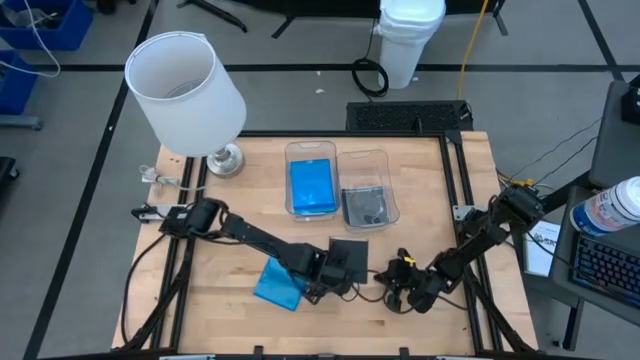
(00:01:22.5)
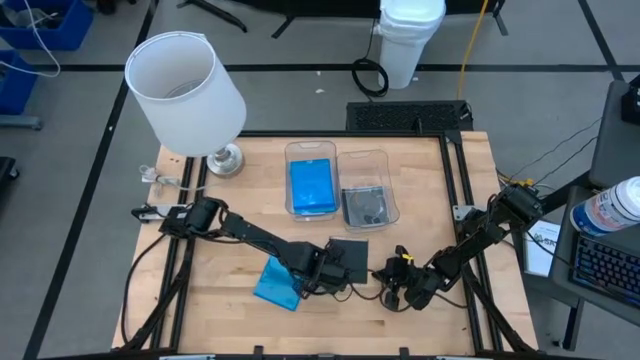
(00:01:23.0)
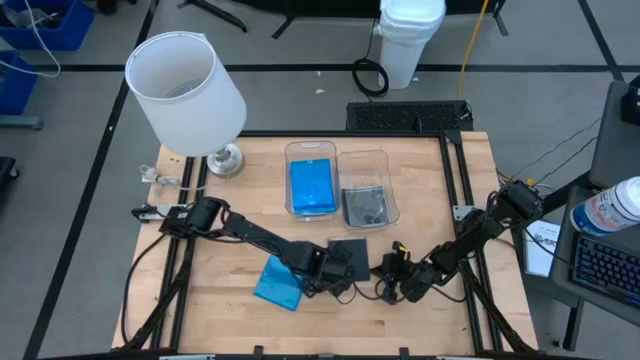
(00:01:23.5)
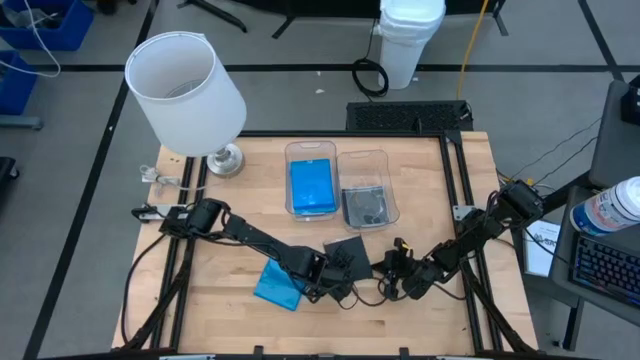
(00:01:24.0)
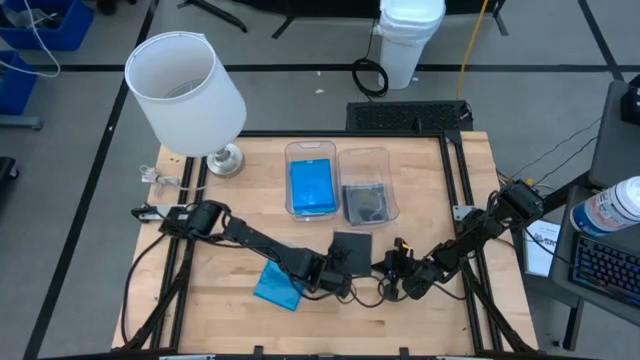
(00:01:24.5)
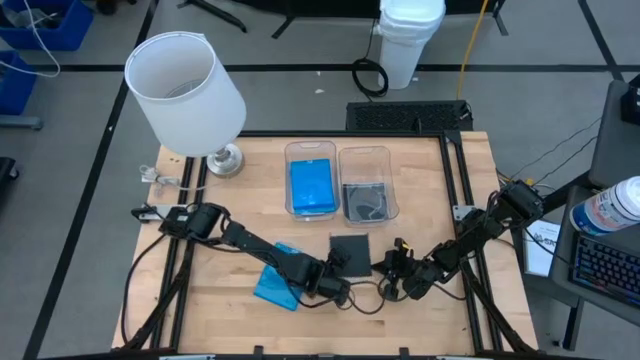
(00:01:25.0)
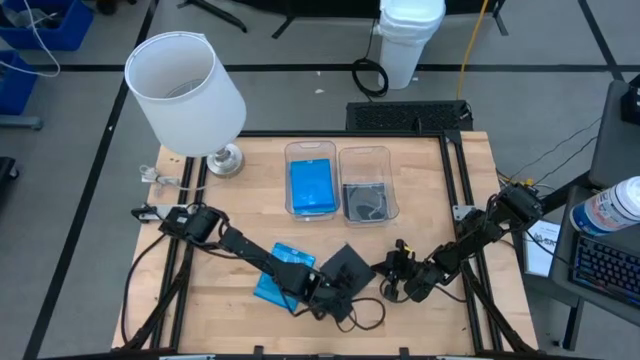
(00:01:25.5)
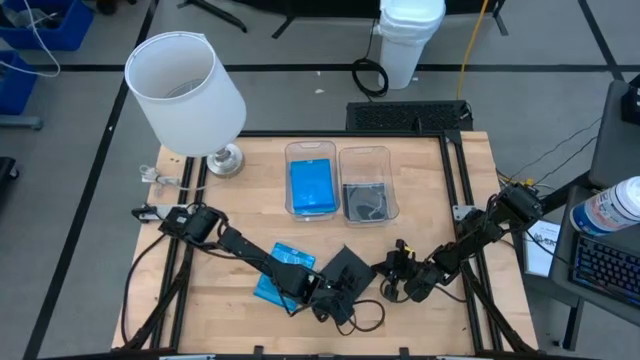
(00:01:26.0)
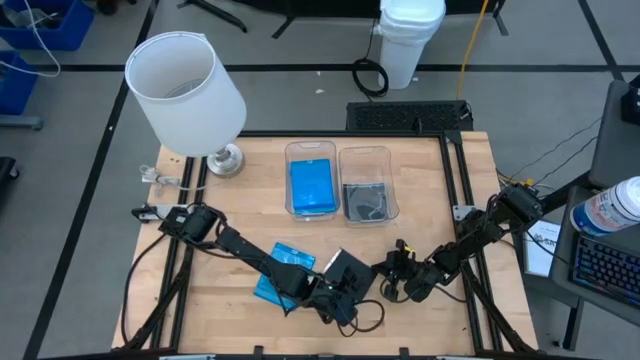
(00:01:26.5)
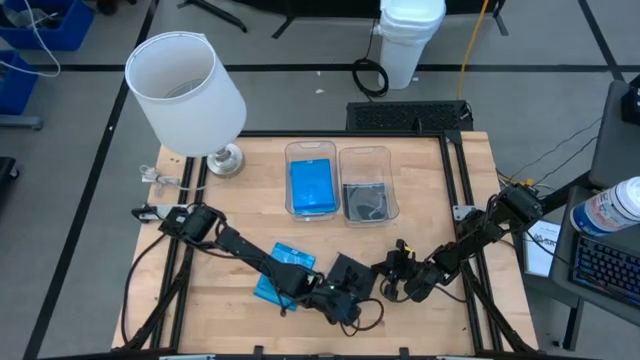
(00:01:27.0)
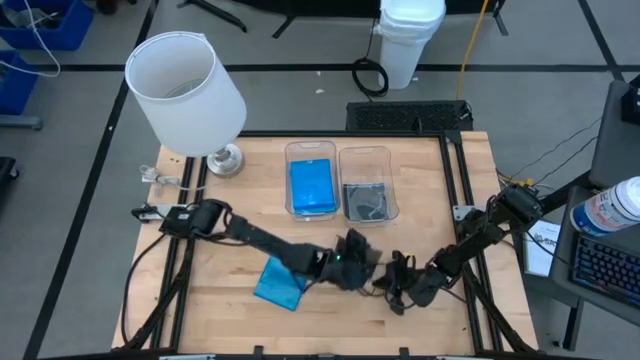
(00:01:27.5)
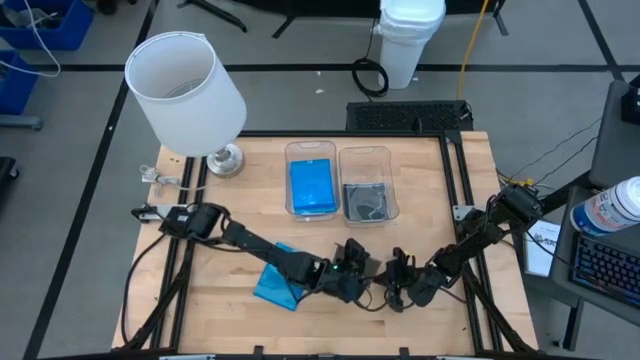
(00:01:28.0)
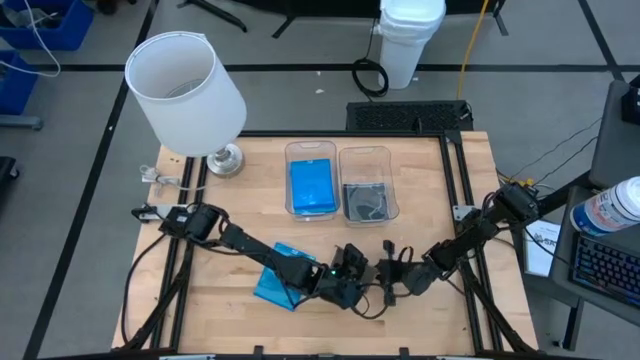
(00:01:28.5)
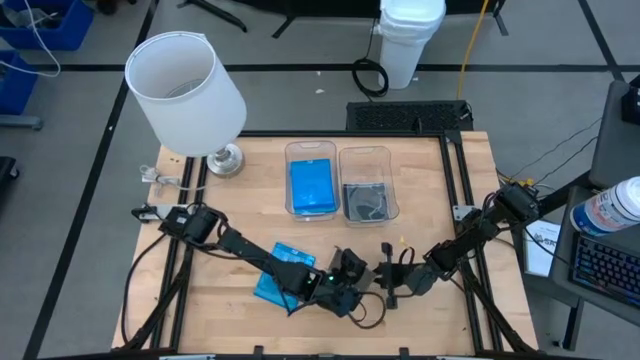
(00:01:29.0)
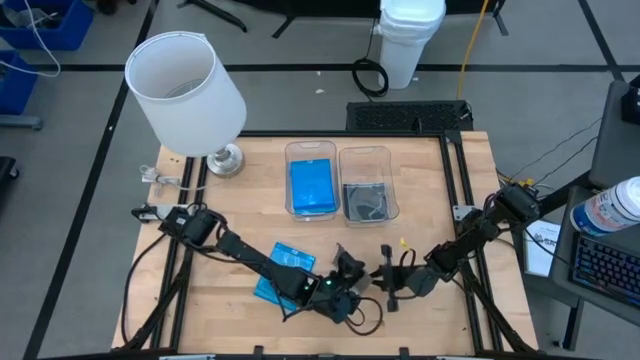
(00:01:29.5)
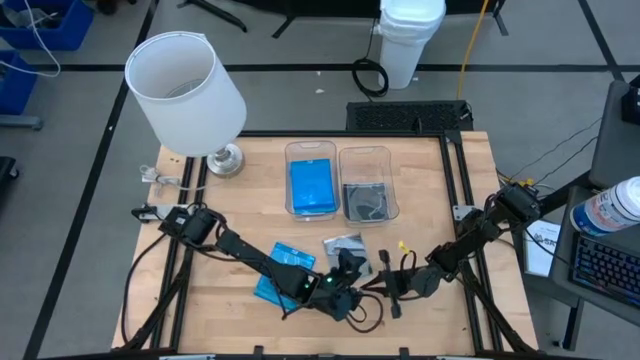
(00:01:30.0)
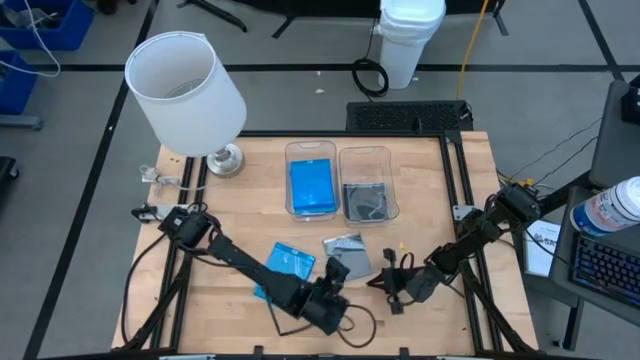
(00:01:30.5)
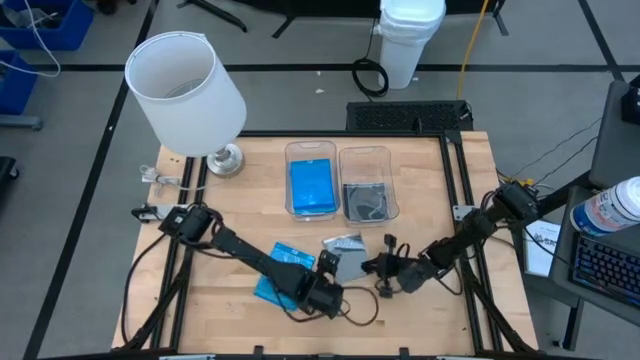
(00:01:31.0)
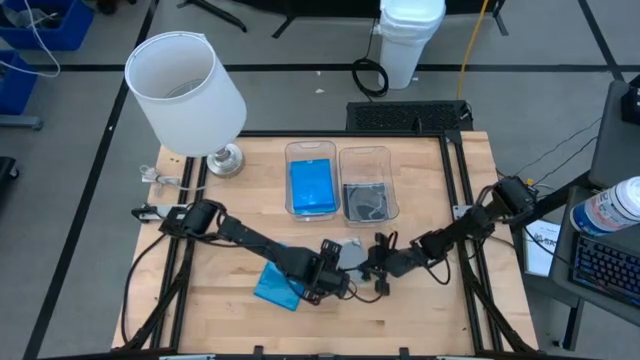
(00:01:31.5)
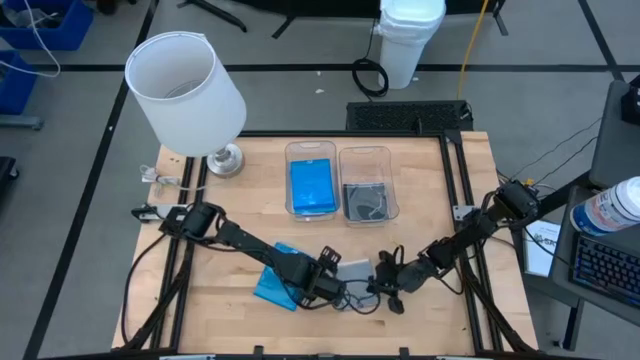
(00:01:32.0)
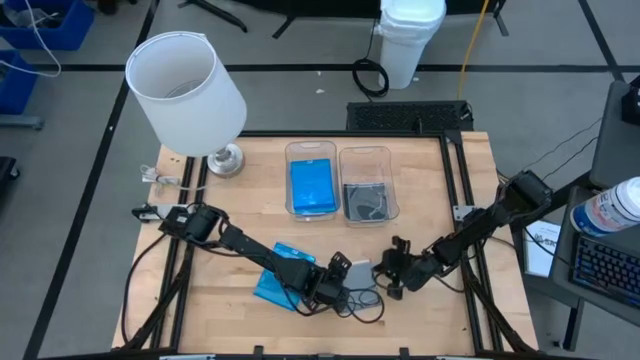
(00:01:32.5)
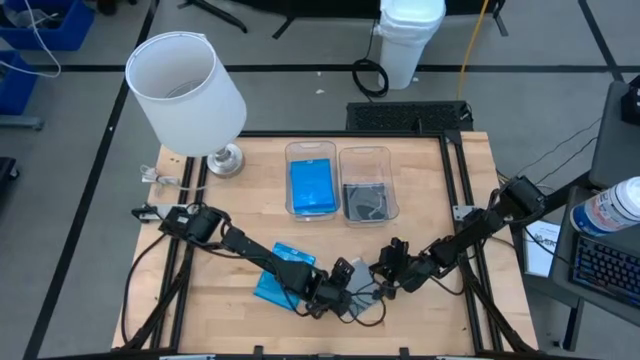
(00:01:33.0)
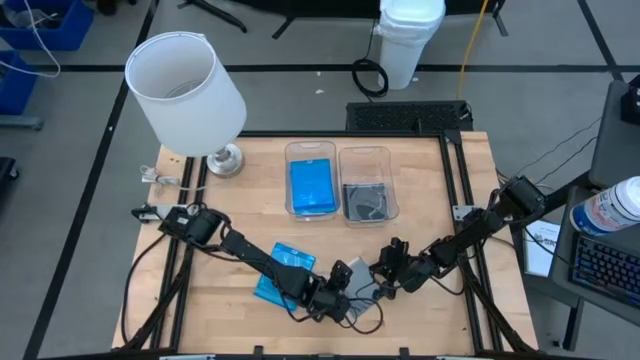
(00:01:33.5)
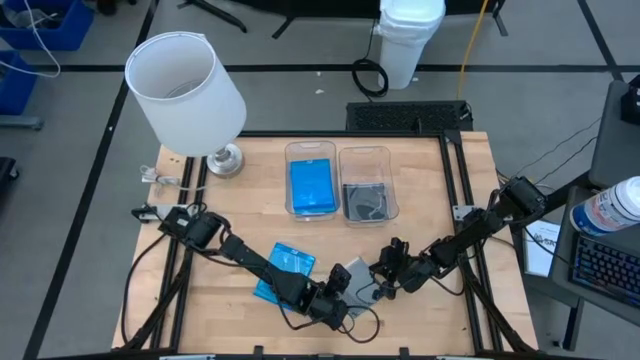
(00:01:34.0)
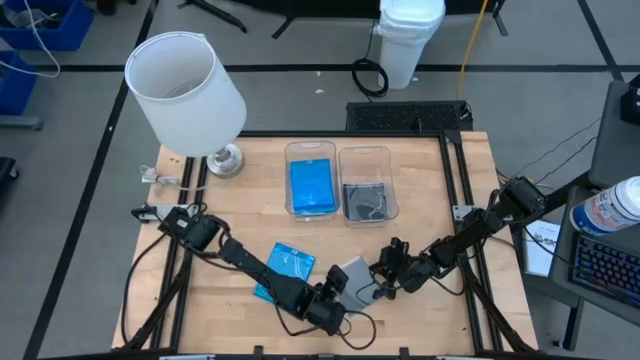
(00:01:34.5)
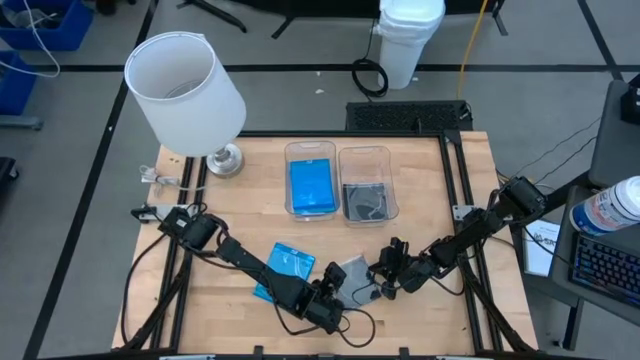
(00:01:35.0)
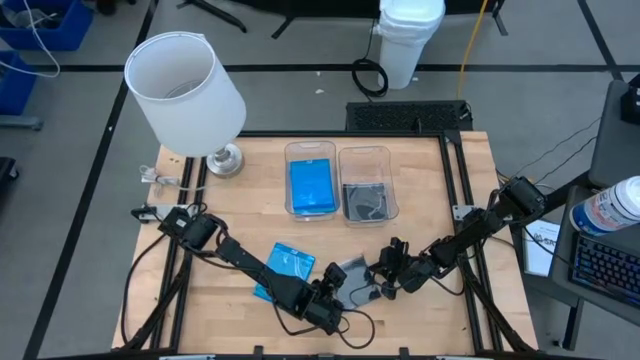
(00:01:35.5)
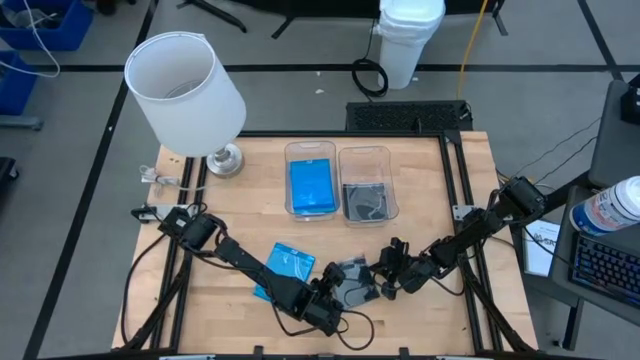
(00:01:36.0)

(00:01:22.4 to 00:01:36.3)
Task: Pick & place jewel cases by type
Stack the black CD case on top of the black CD cases in the right transparent bin

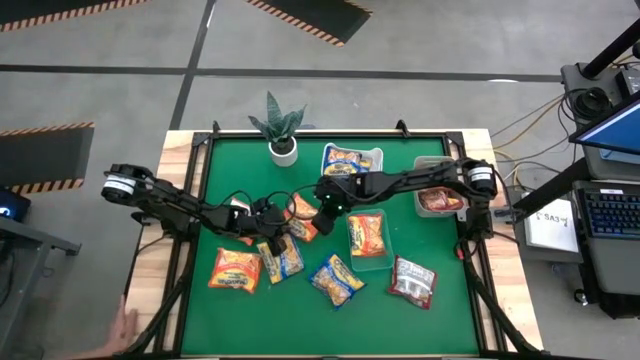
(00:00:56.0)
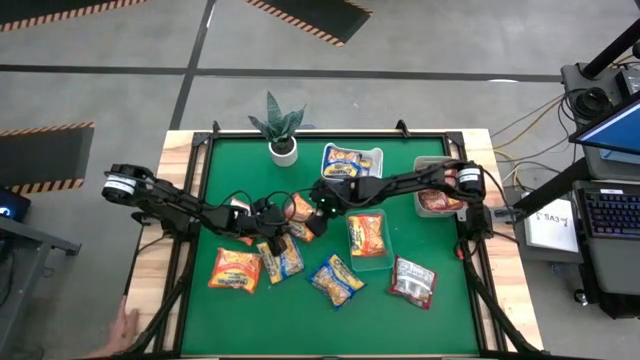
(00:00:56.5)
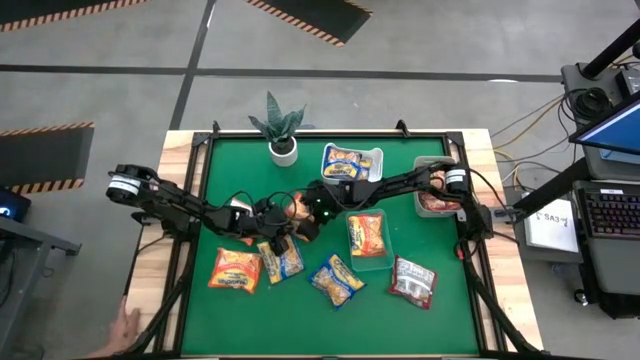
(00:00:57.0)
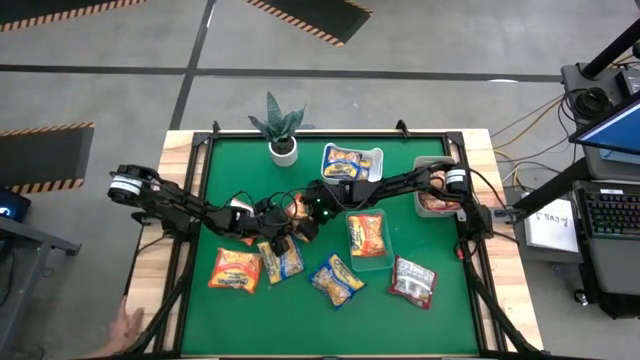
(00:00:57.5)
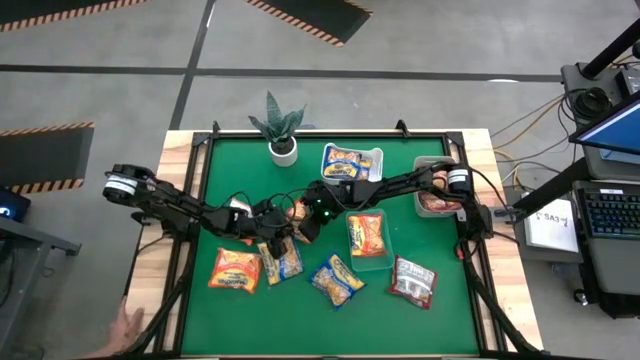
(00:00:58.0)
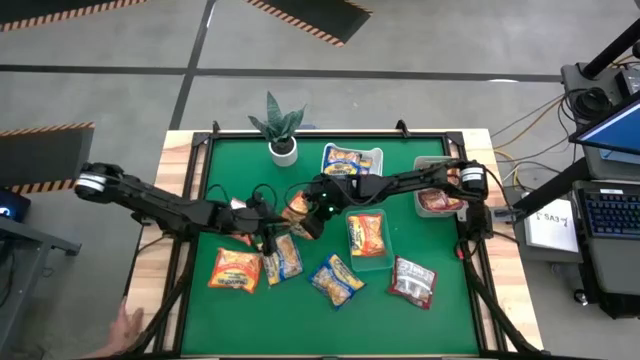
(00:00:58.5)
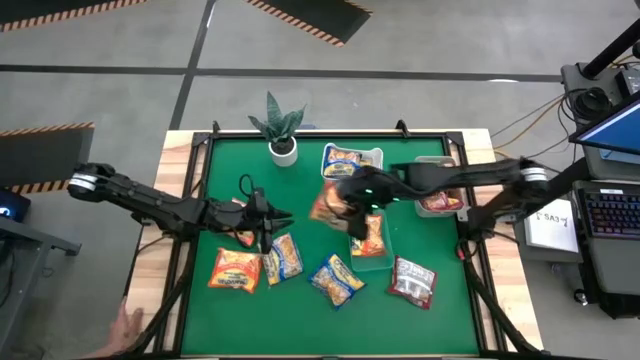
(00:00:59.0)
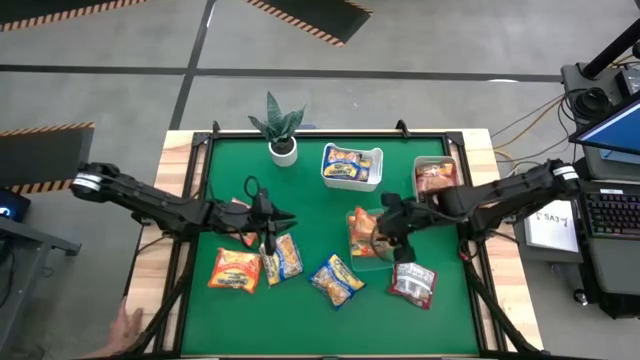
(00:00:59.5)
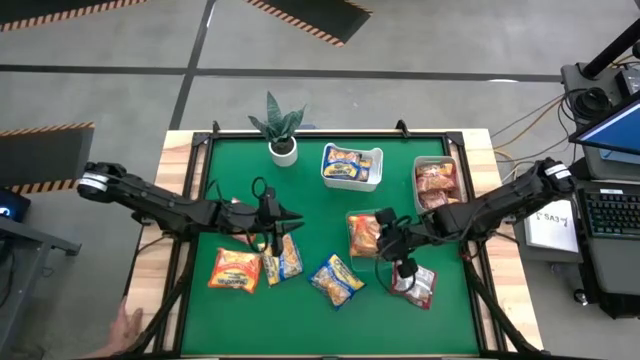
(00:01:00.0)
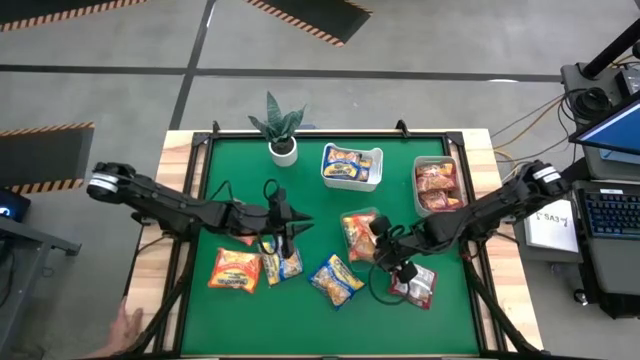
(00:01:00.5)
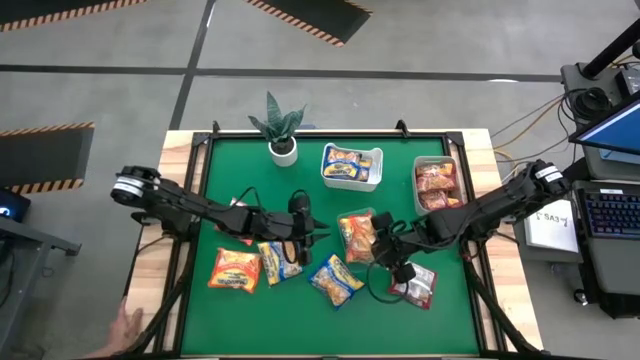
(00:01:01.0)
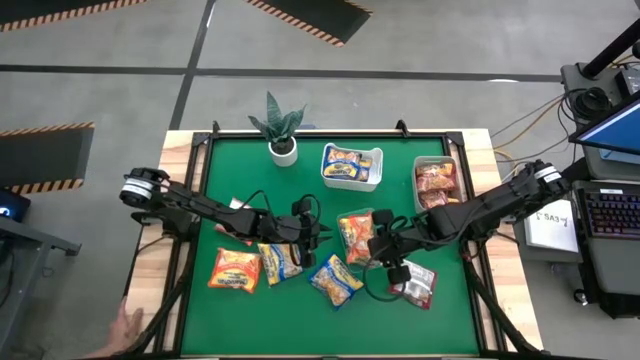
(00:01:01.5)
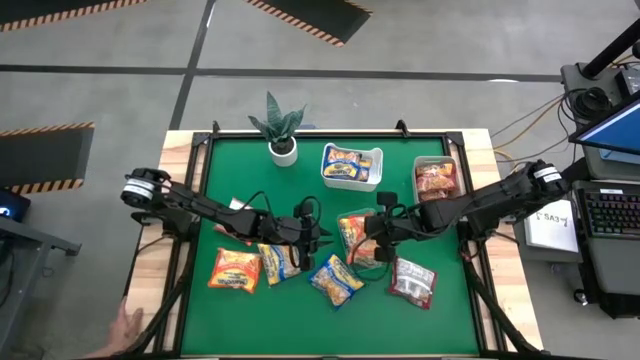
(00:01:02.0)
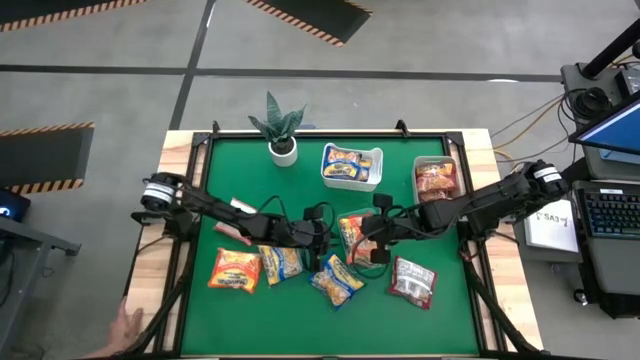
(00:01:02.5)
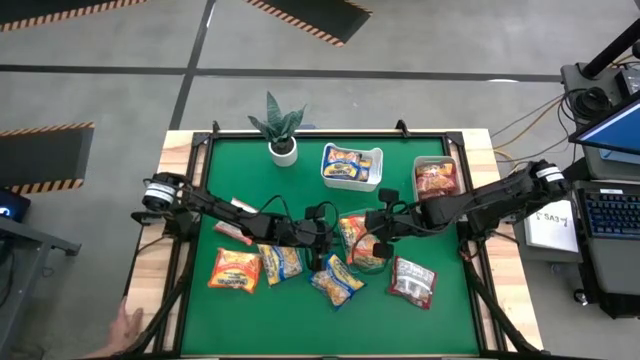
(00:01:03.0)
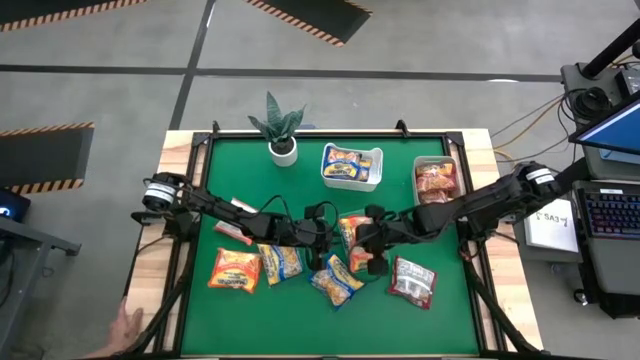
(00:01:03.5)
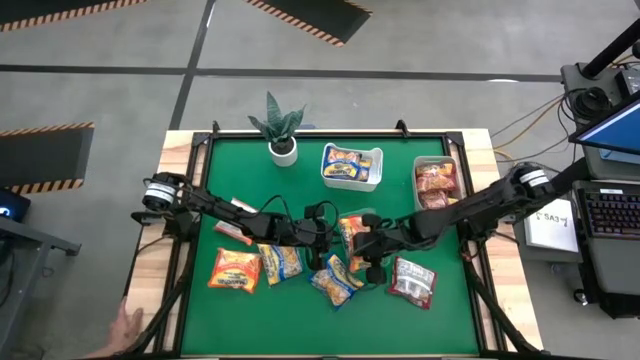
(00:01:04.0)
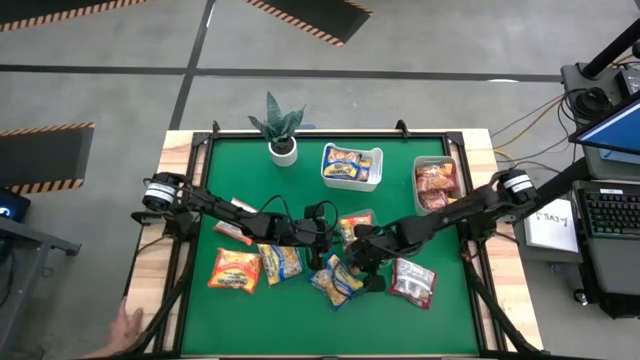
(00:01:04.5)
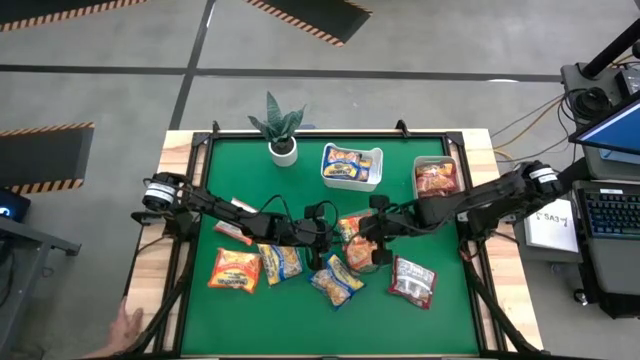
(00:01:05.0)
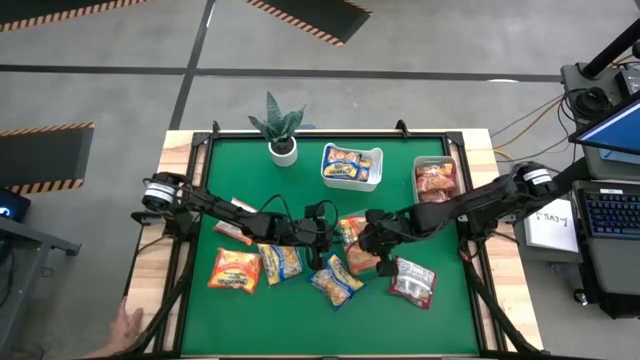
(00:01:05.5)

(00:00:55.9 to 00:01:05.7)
Task: Sort Maruchan noodles
Put the orange noodle pack into the green bin
